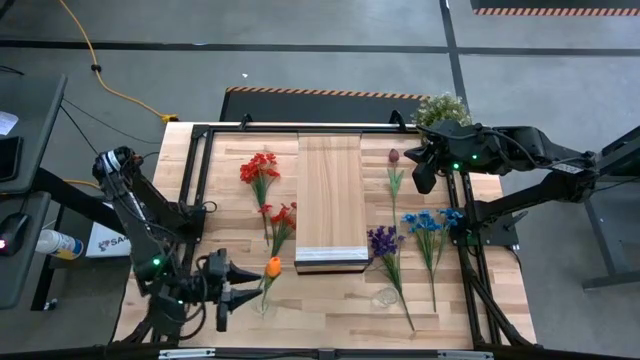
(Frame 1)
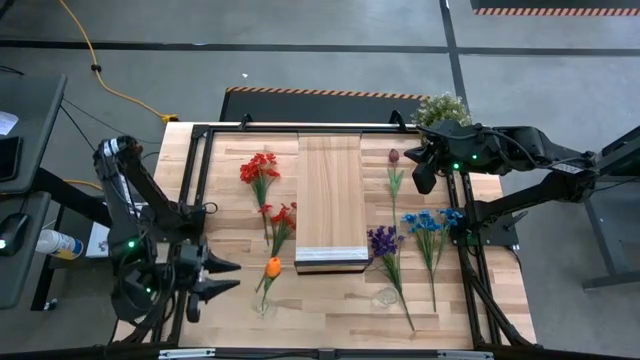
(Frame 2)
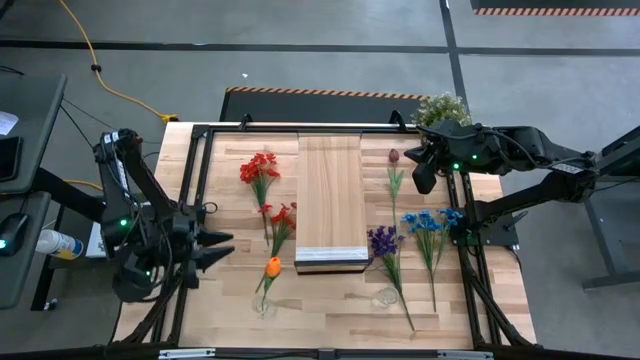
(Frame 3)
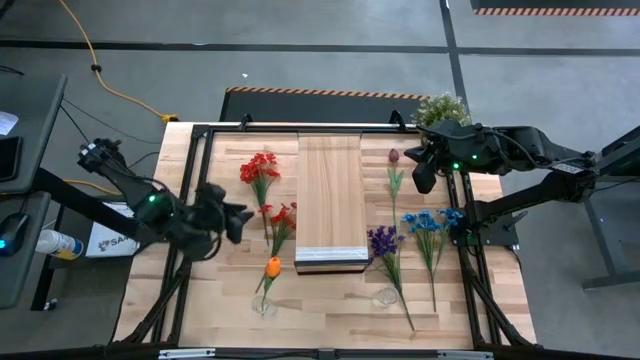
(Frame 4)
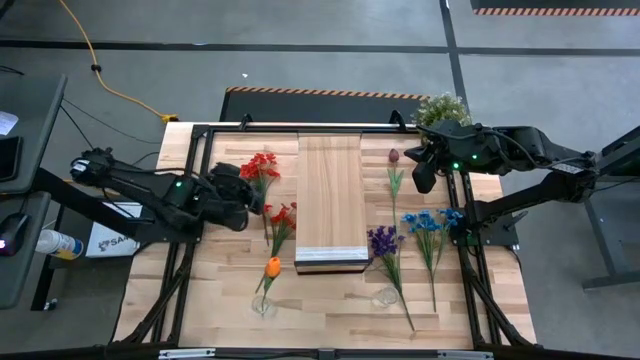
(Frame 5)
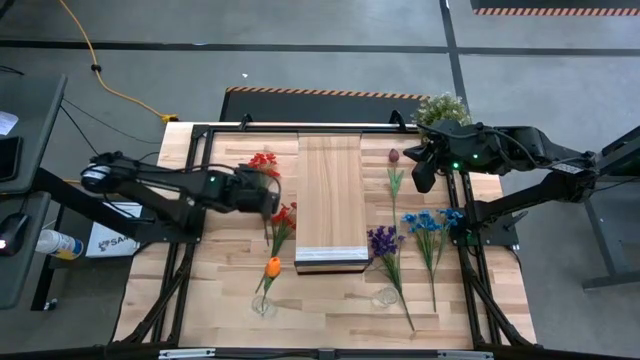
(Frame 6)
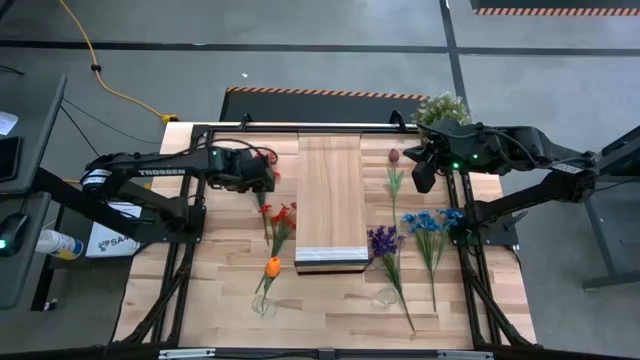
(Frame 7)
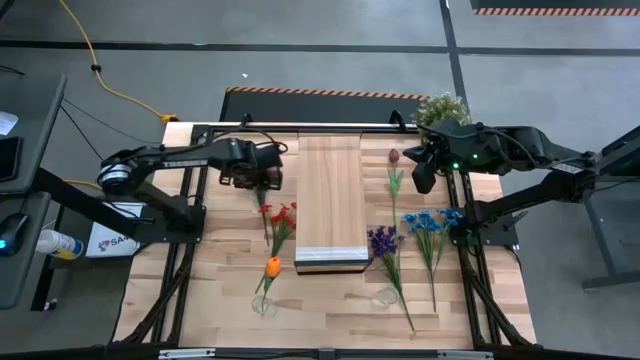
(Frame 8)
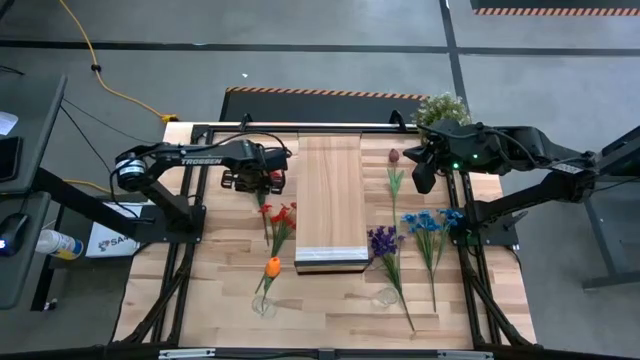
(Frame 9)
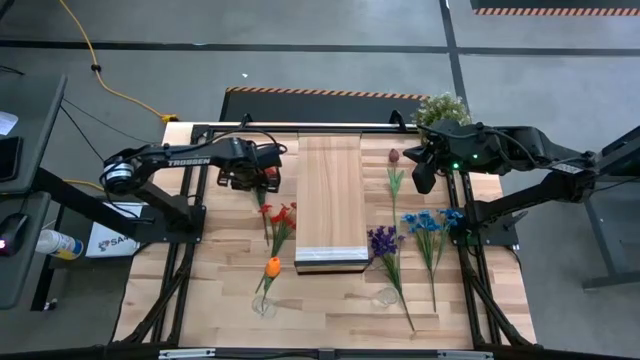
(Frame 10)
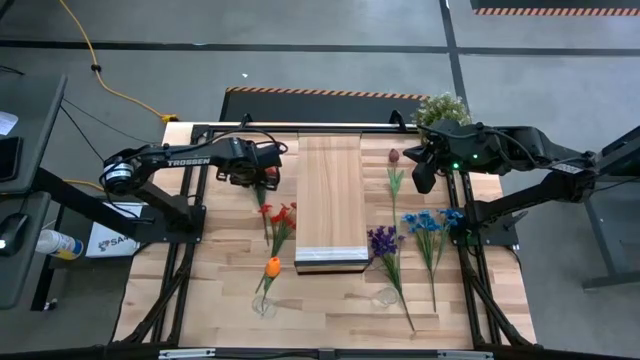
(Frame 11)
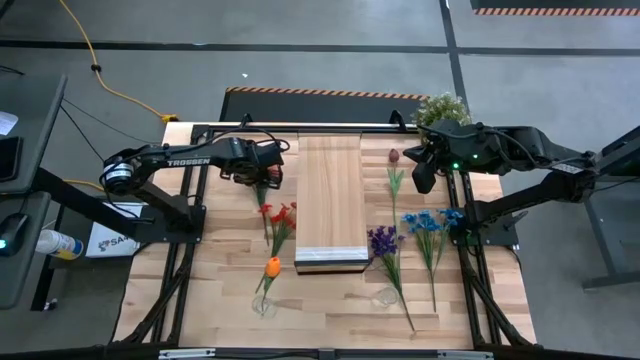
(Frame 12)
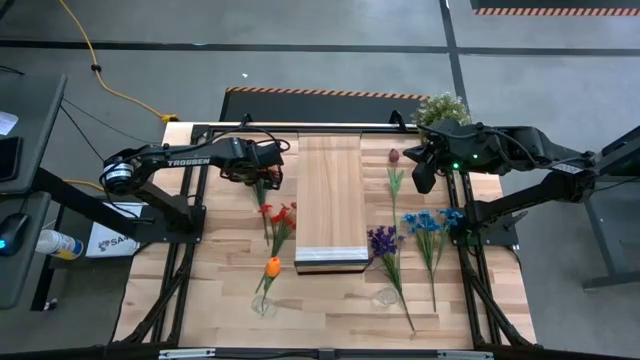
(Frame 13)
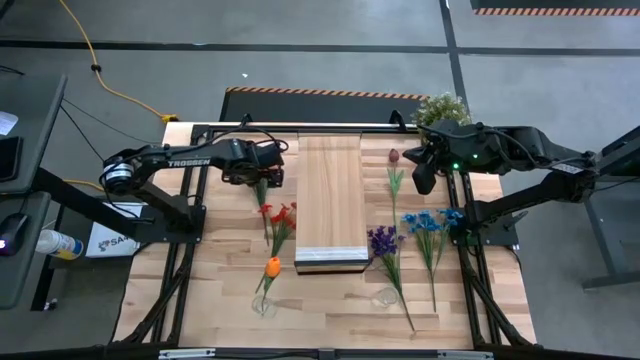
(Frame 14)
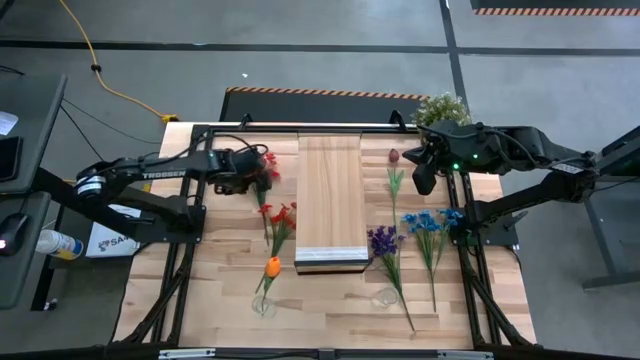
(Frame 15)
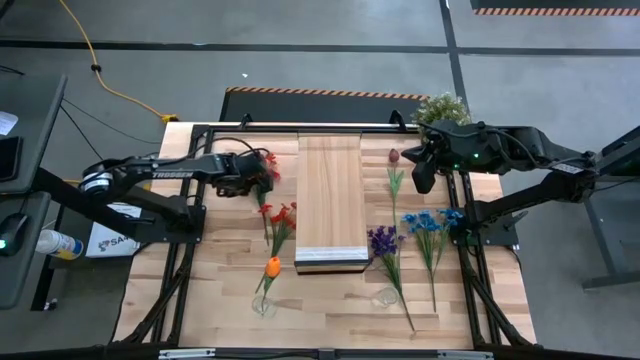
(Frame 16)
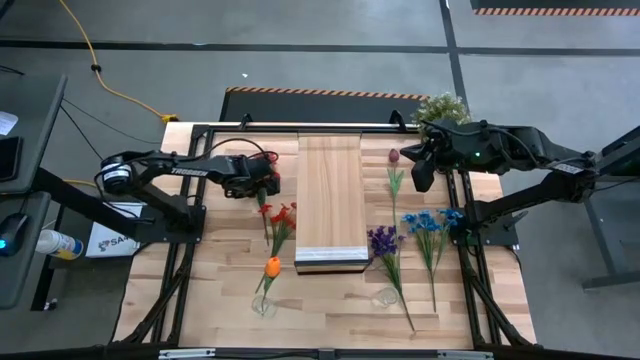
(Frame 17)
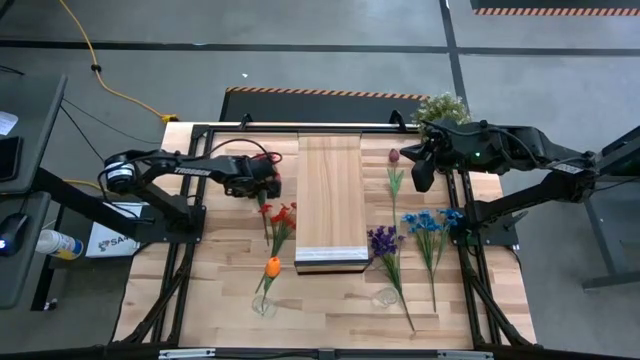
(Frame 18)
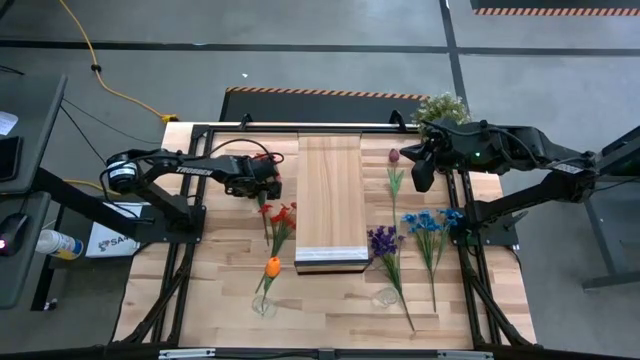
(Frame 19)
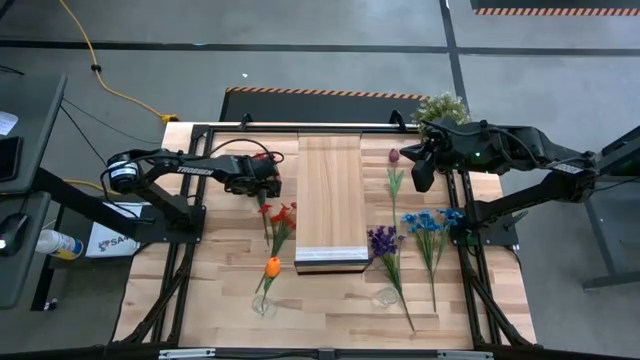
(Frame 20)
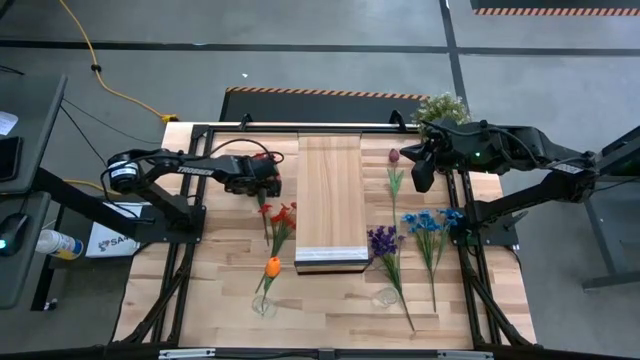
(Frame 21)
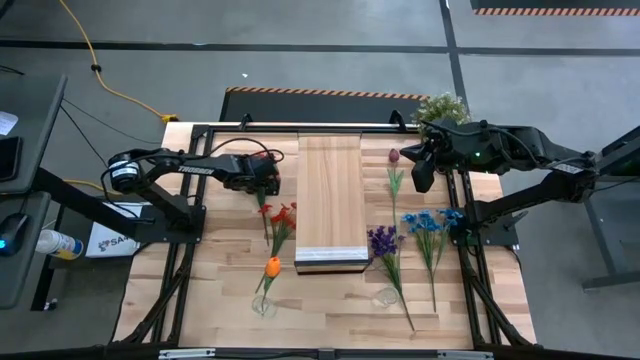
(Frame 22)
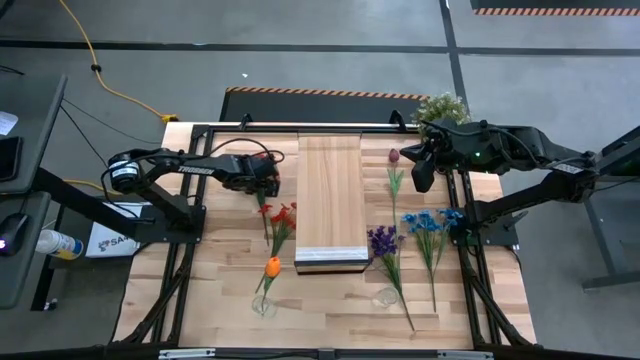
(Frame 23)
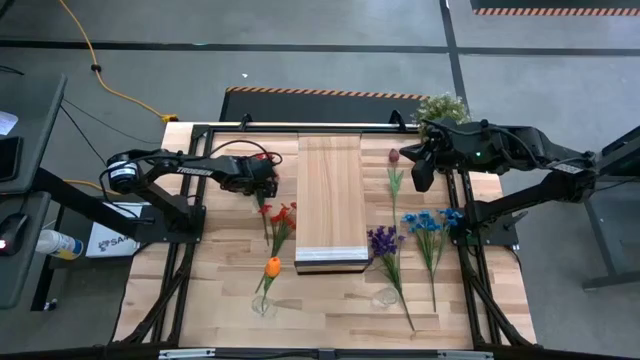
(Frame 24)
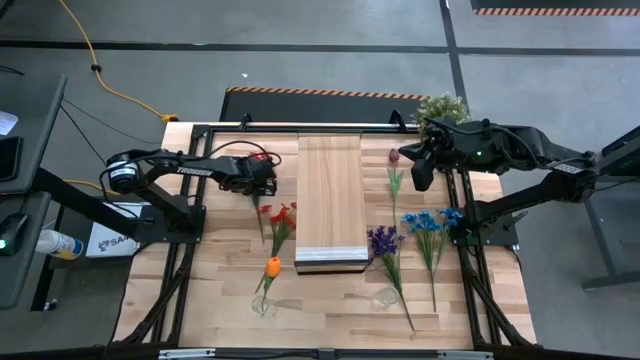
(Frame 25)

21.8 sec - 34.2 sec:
Task: Pick and place flowers into a vace then onto a shelf
Put the top red flowers into the left transparent vase
